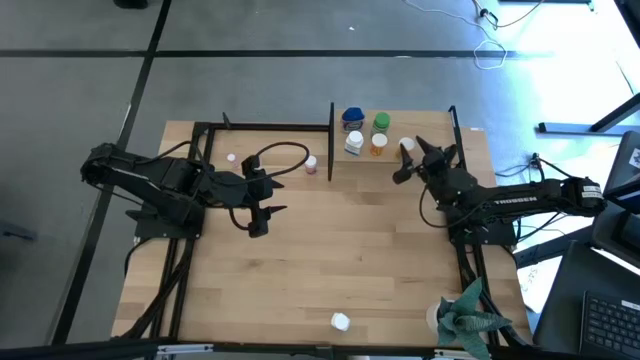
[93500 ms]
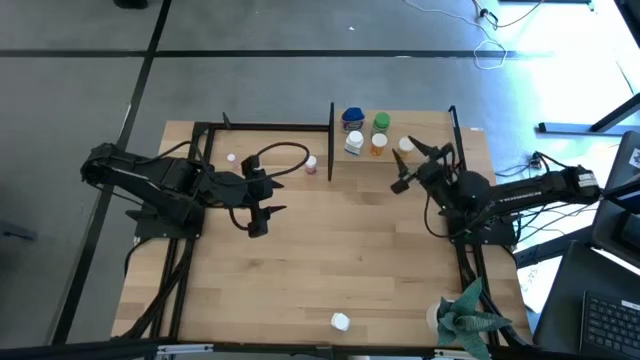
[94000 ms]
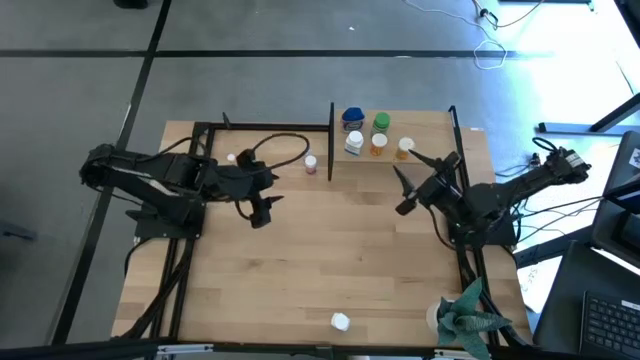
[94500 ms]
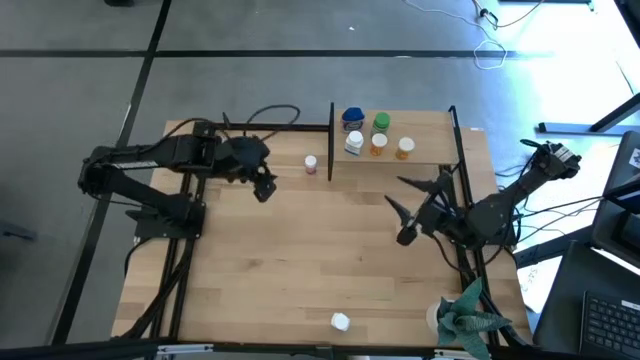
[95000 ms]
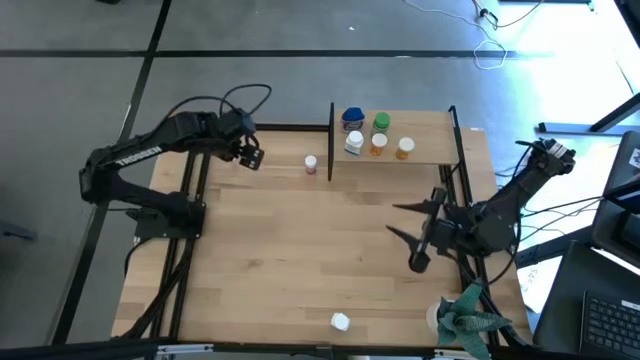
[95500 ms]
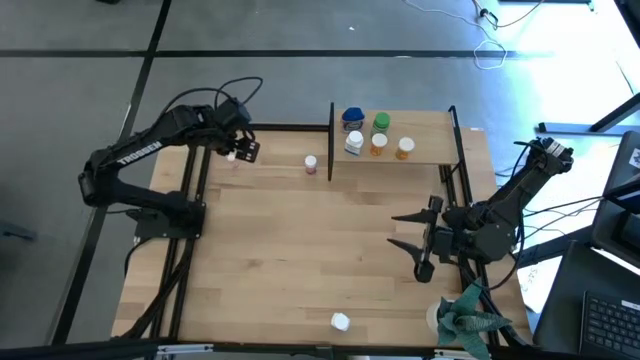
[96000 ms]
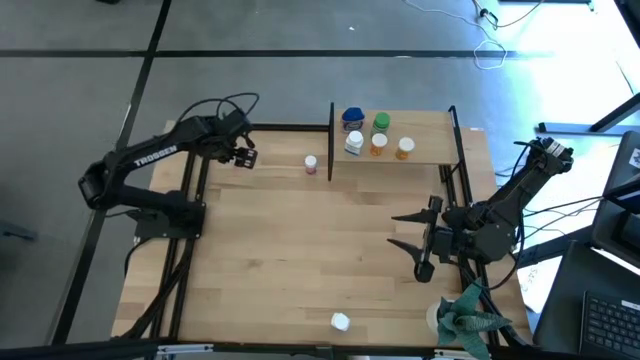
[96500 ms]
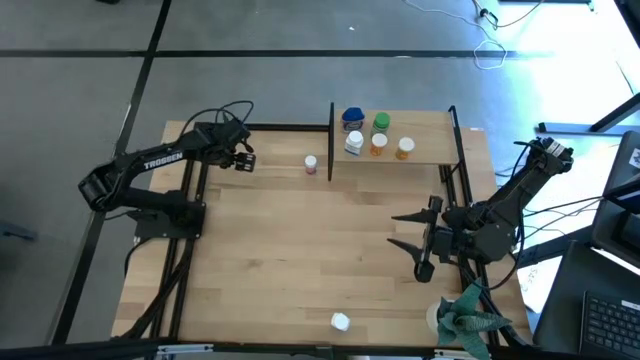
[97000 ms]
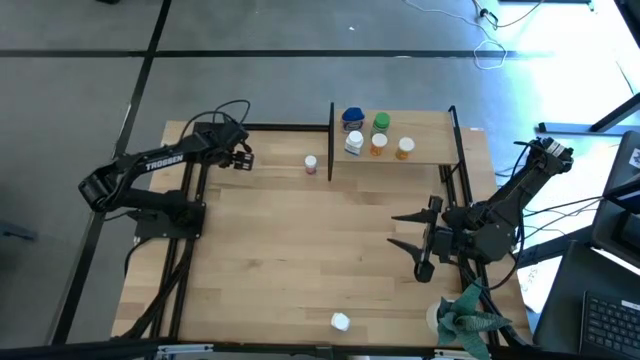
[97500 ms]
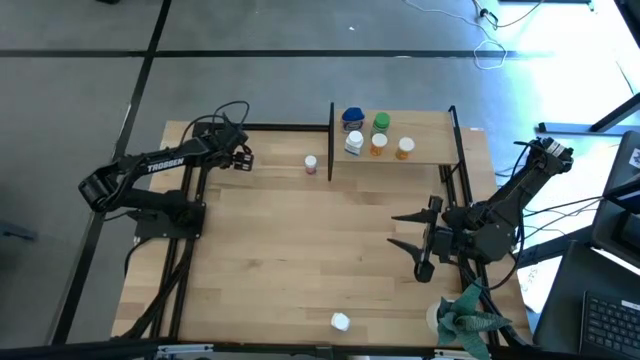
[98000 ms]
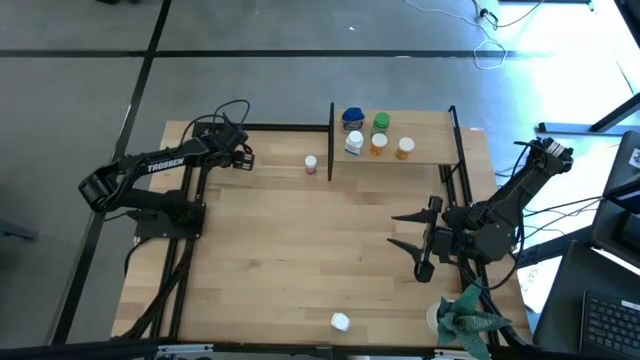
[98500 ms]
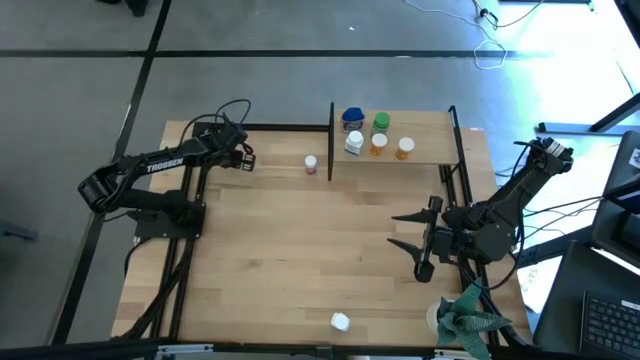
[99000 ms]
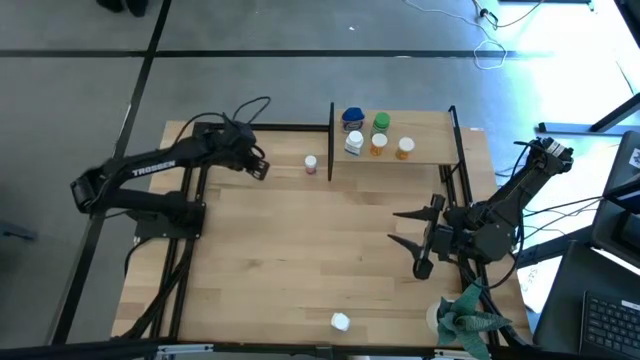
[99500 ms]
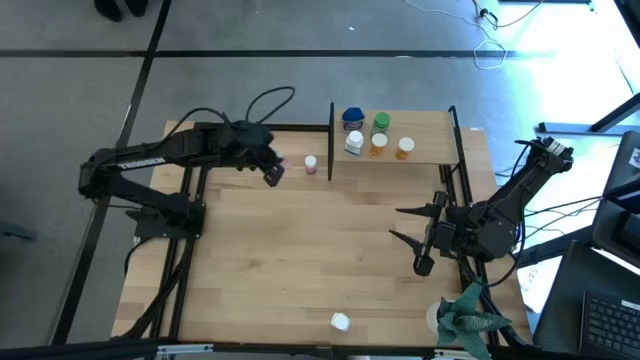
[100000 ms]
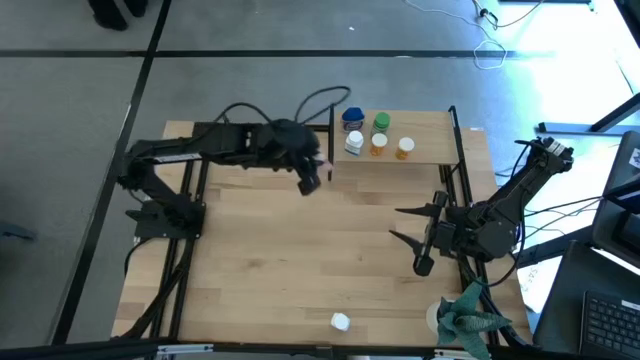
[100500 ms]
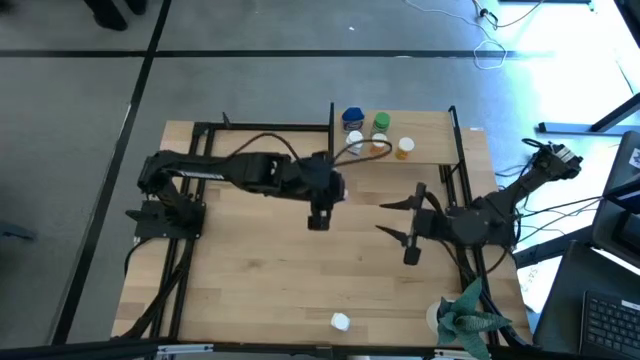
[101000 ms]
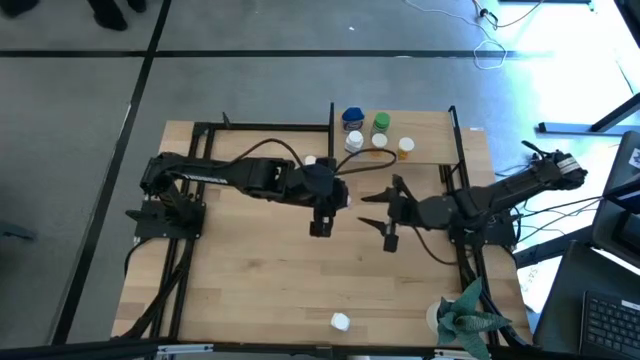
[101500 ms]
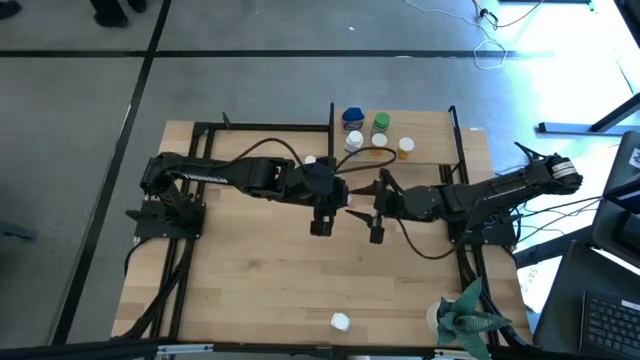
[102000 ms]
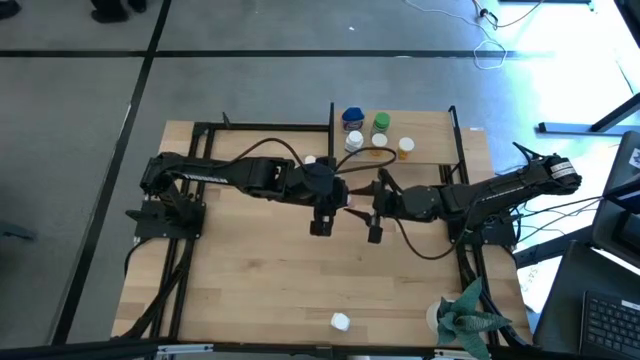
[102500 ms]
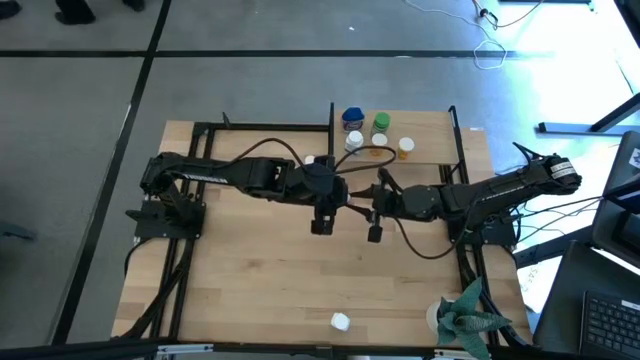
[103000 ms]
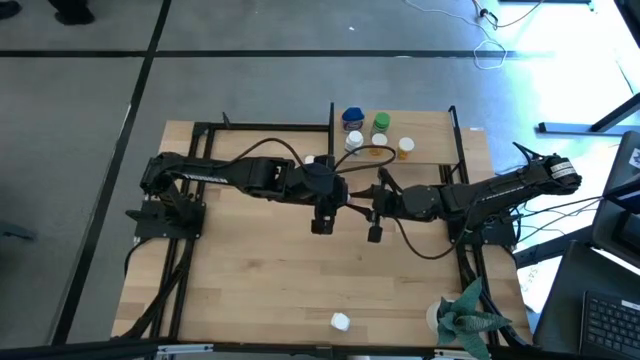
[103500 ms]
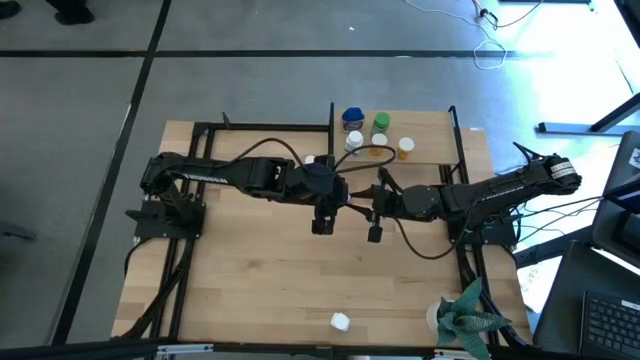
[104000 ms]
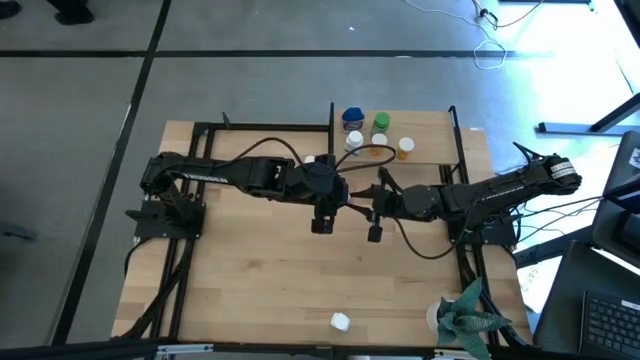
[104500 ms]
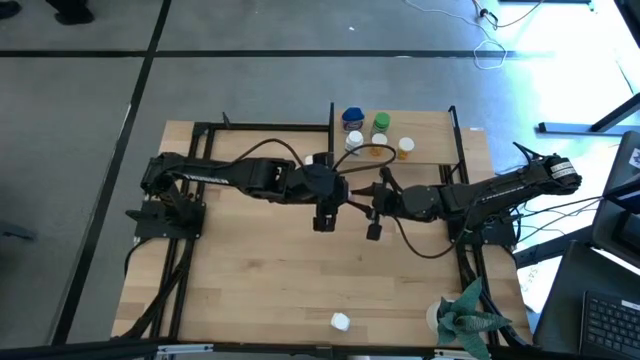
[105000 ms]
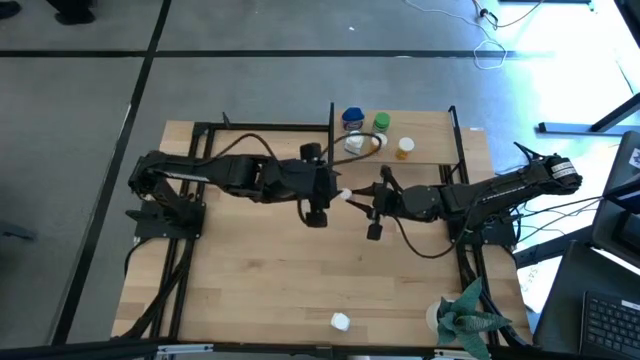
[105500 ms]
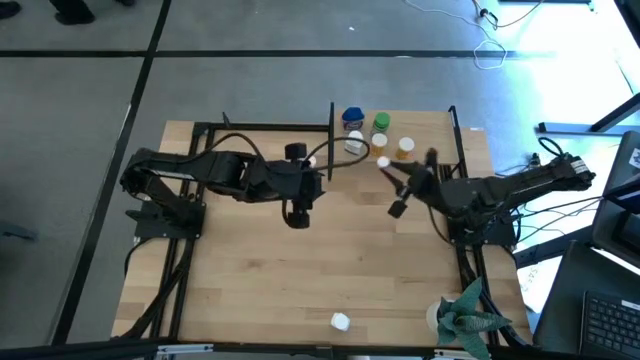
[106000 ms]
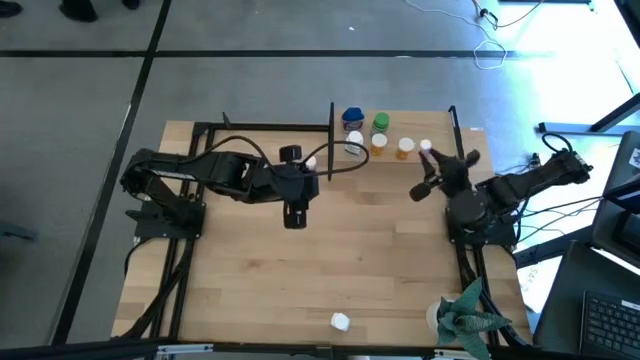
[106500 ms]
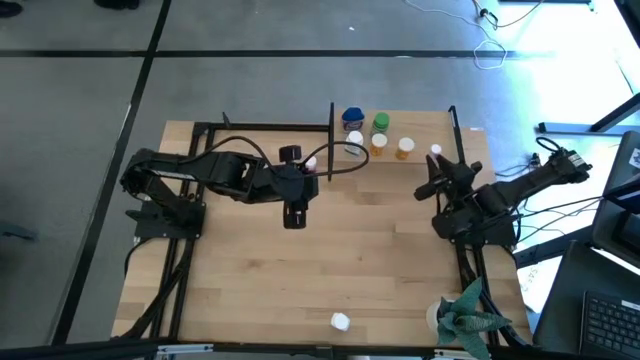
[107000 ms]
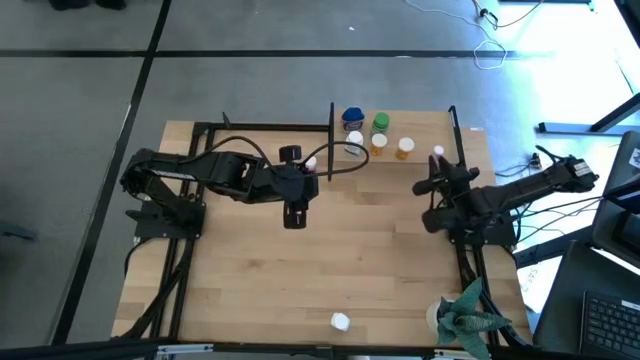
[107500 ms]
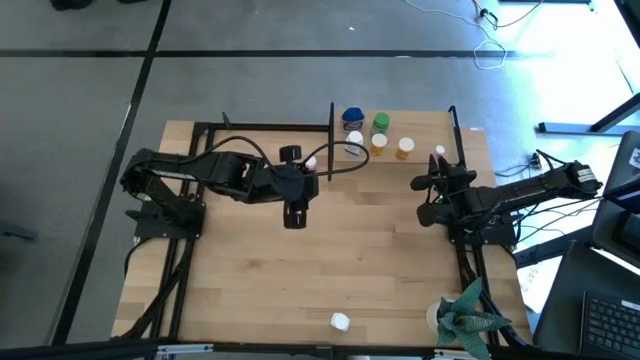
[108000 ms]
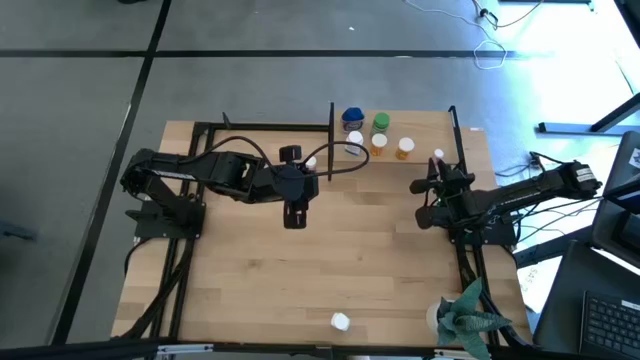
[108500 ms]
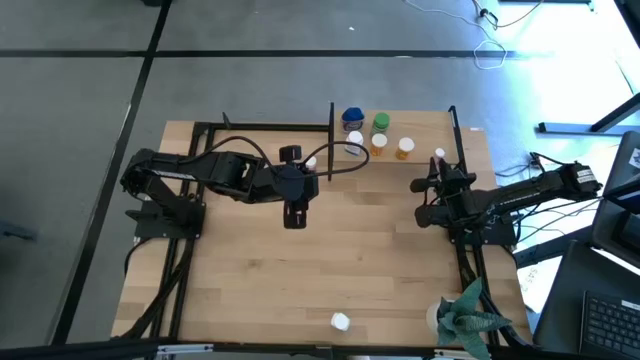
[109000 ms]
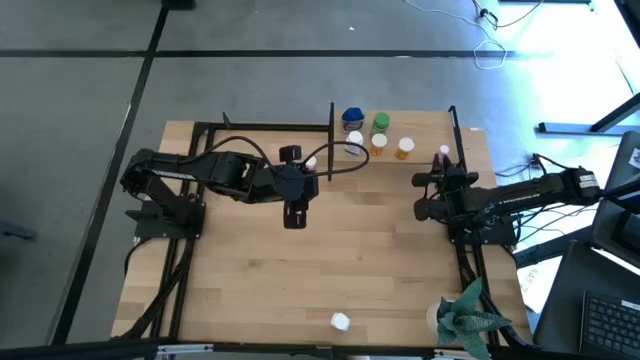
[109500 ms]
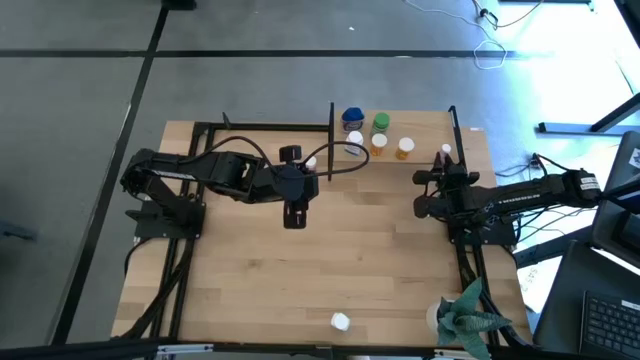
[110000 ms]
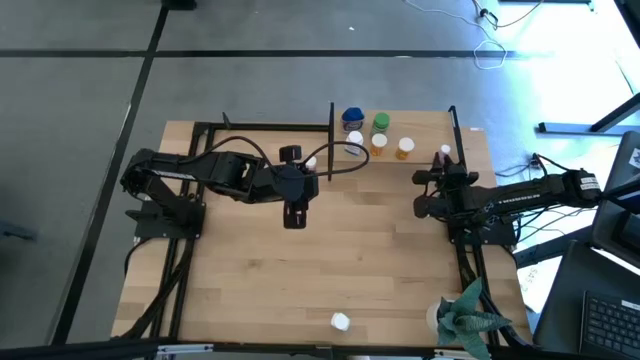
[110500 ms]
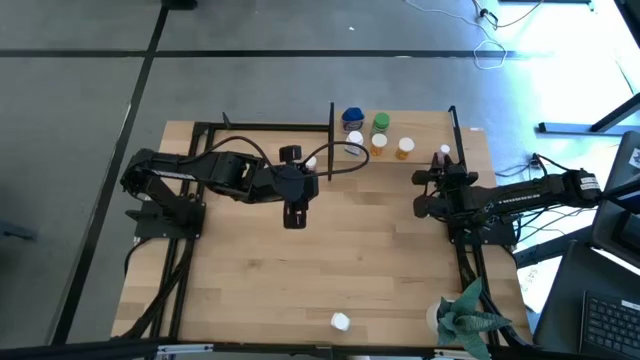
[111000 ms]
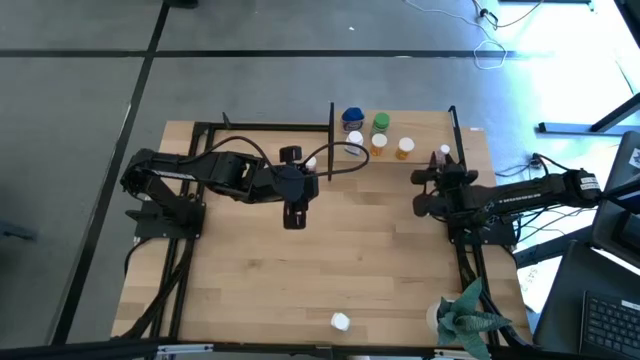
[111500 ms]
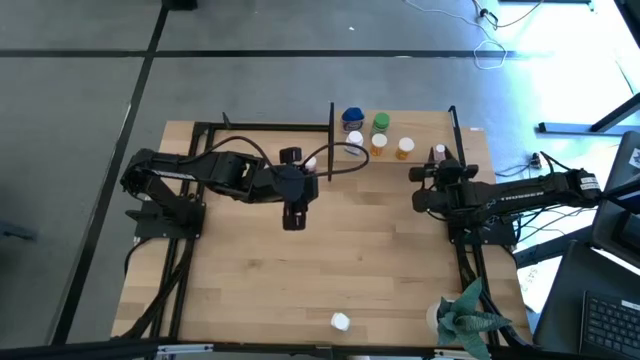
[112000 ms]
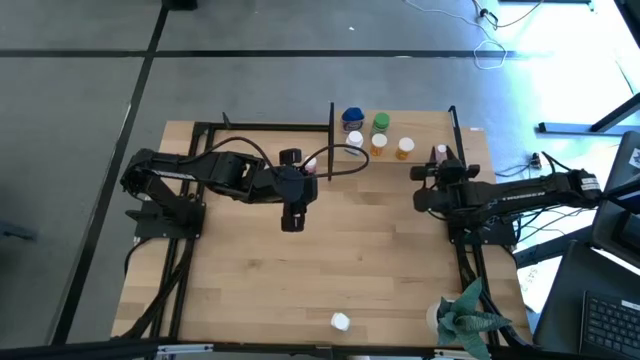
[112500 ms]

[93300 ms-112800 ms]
Task: Pick and place medicine bottles onto shelf by color
Put the light pink medicine bottle on the shelf

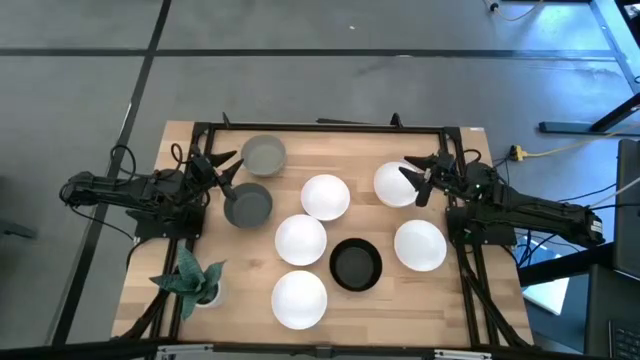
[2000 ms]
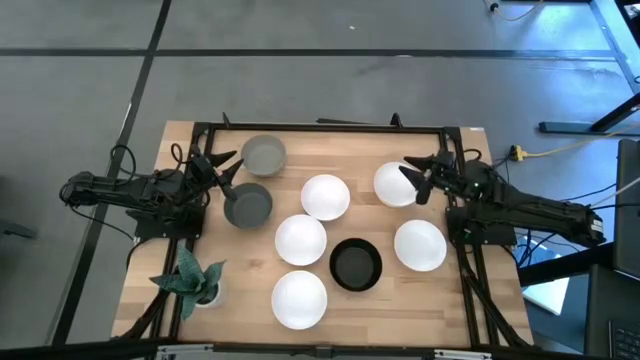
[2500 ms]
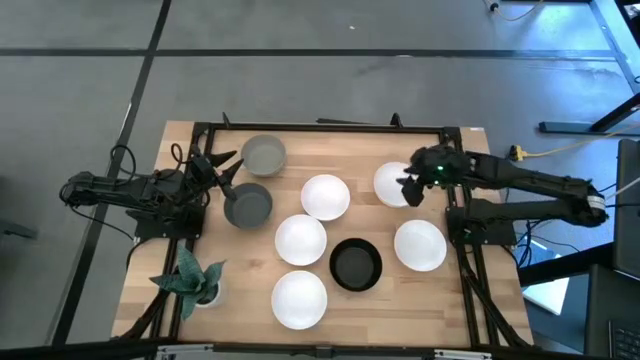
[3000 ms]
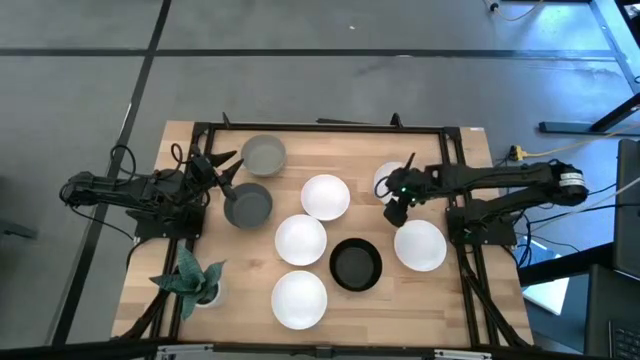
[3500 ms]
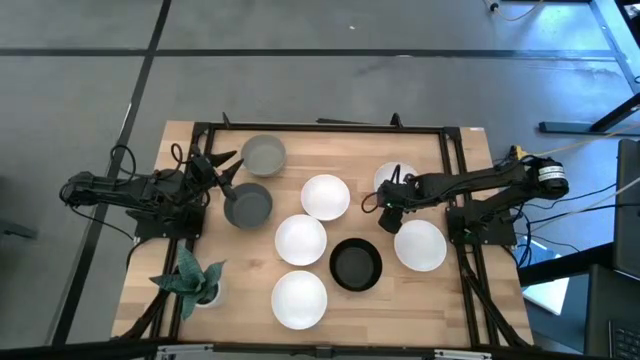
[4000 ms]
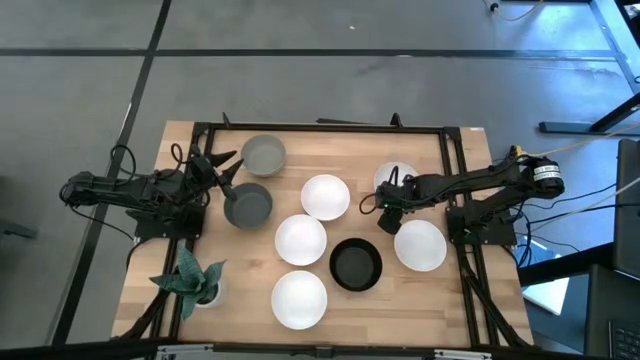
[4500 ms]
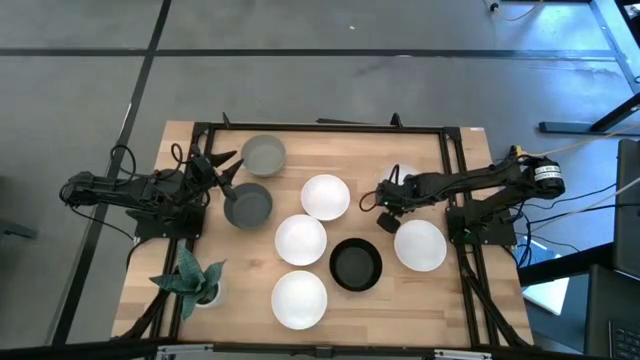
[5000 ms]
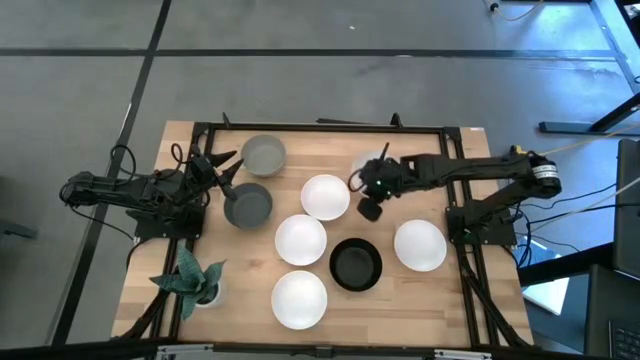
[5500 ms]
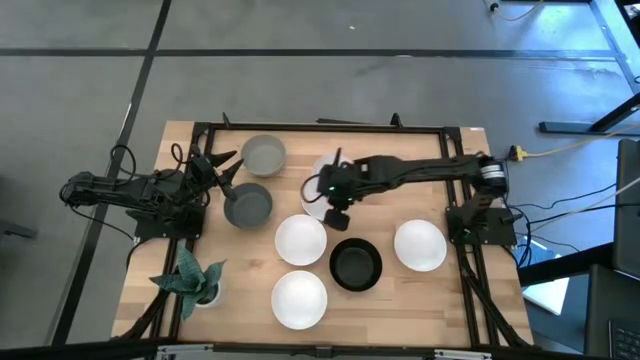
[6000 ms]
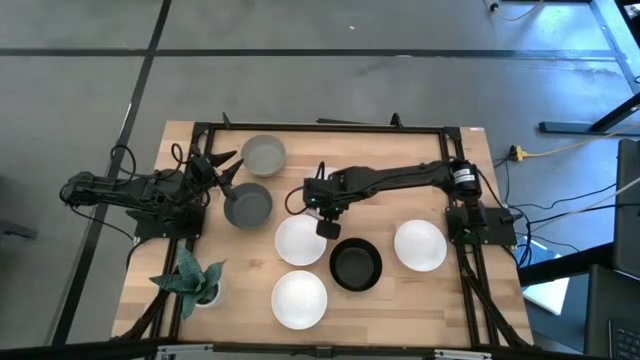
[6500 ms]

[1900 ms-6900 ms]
Task: Nest bowls inside each other
Stack the white bowl on top of the white bowl
